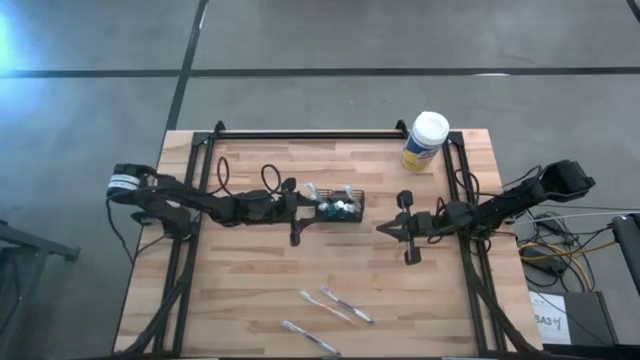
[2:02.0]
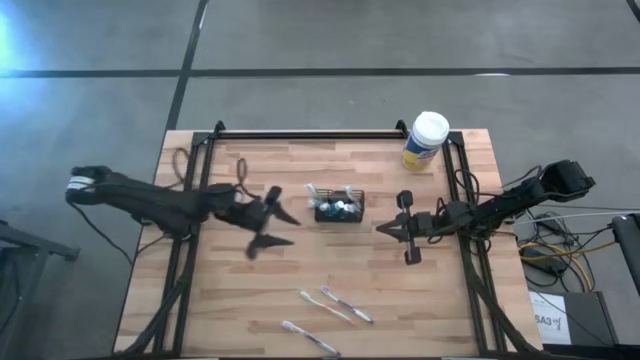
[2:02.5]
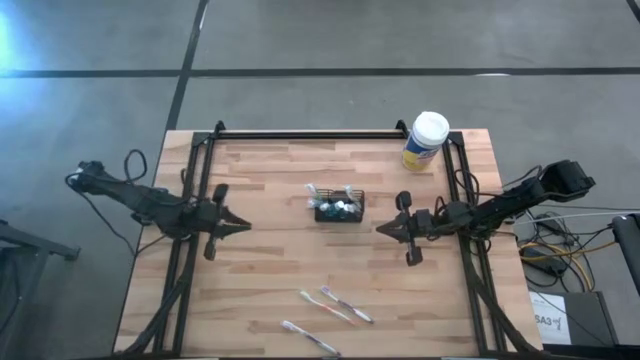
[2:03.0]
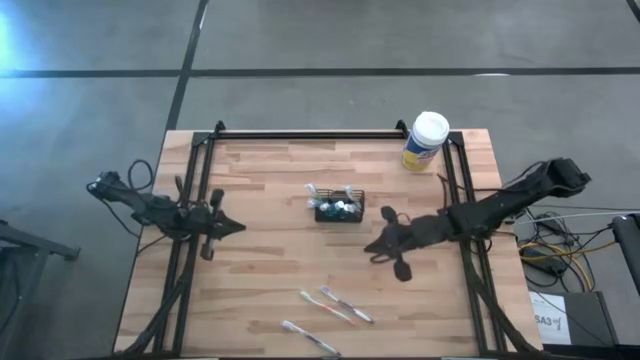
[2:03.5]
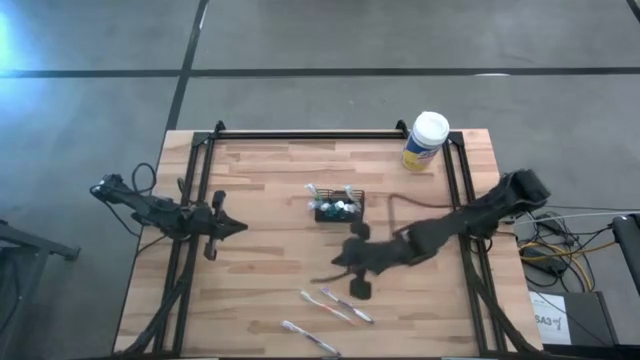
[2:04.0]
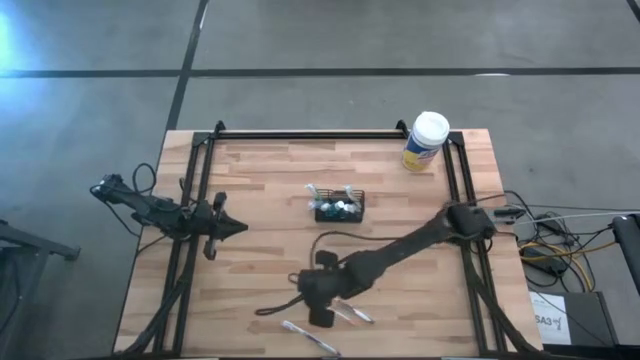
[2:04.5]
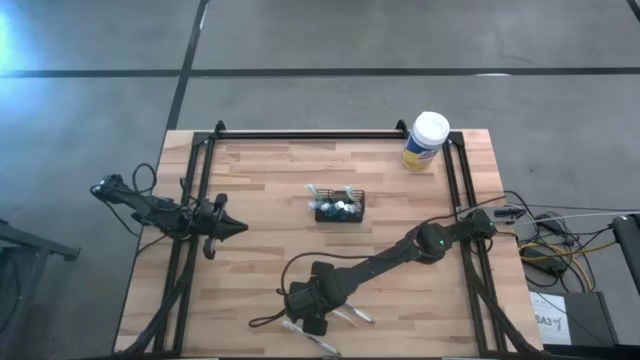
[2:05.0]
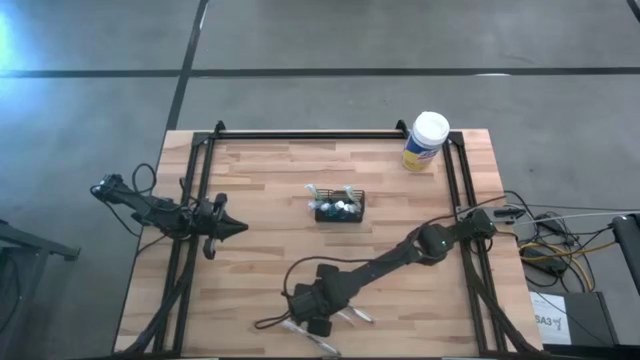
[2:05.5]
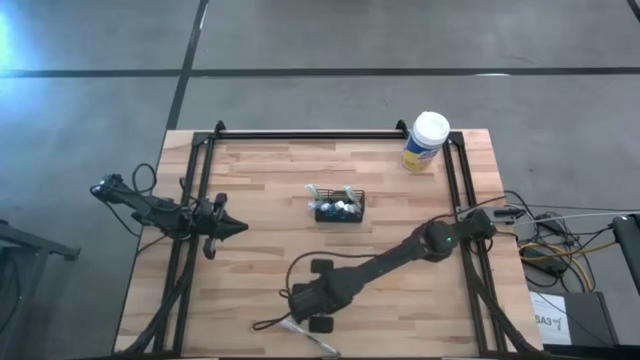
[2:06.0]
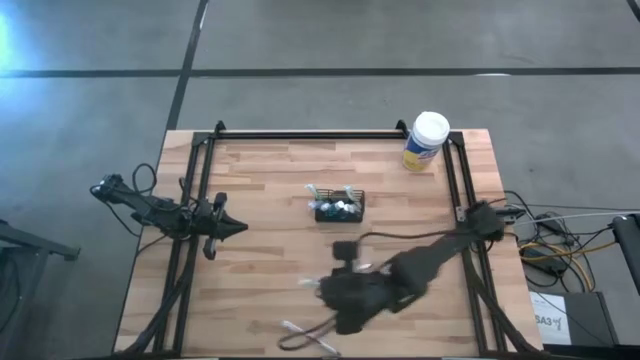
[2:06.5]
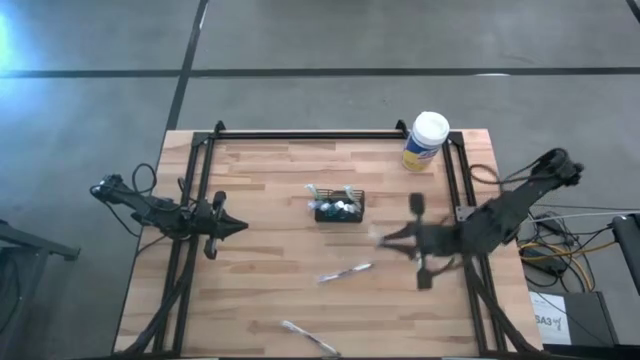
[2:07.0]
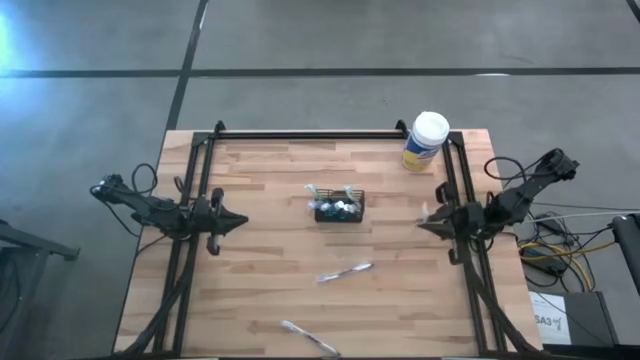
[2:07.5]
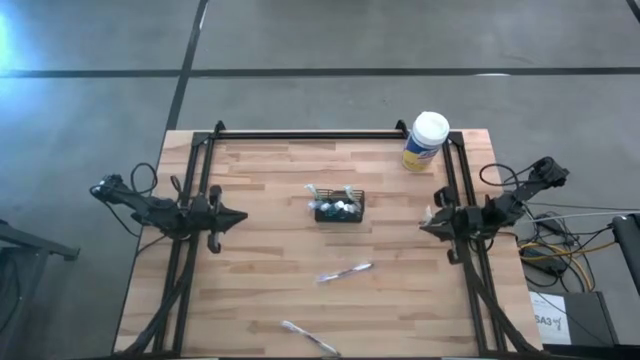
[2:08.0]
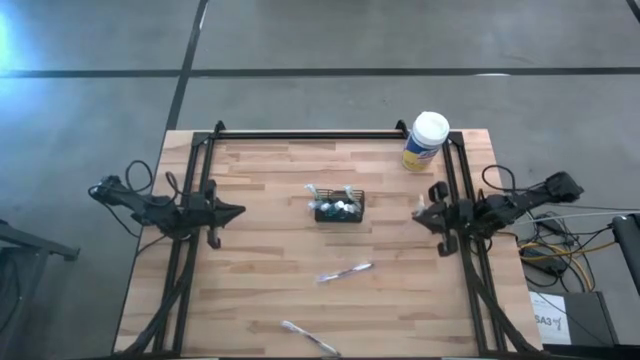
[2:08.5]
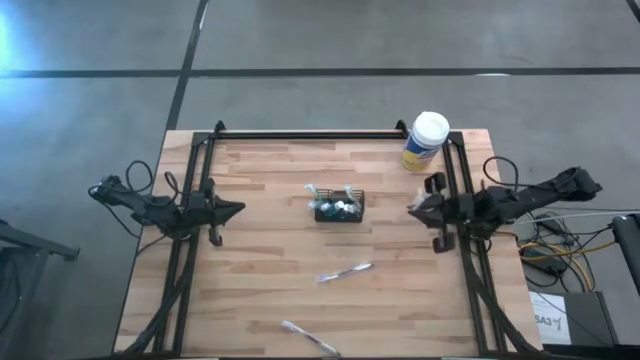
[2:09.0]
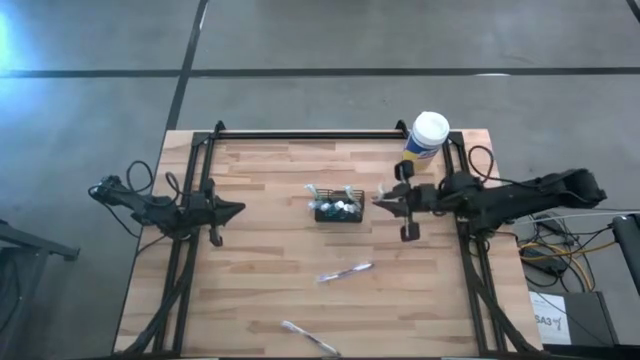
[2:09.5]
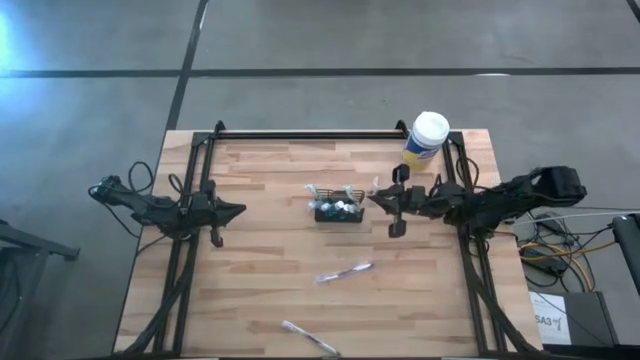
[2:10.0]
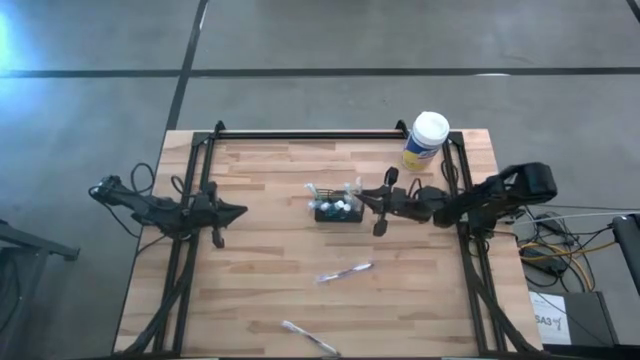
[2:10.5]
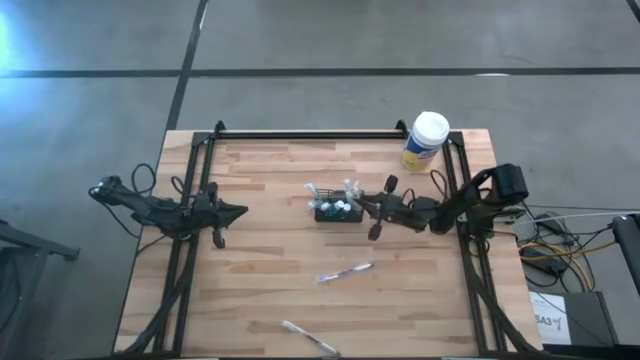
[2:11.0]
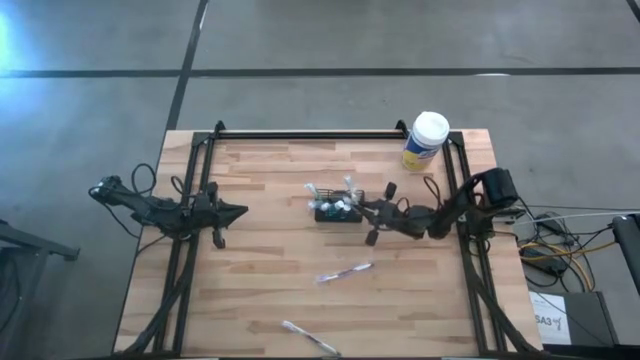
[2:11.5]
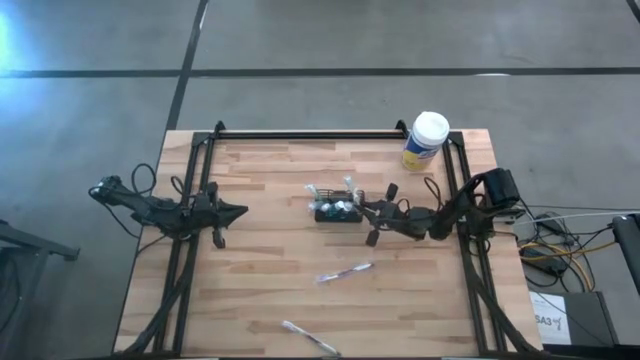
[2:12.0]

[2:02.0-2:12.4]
Task: Pick & Place toothbrushing station
Put the orange toothbrush into the black wire organizer

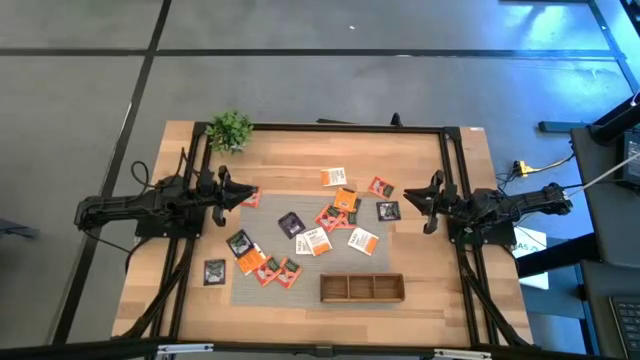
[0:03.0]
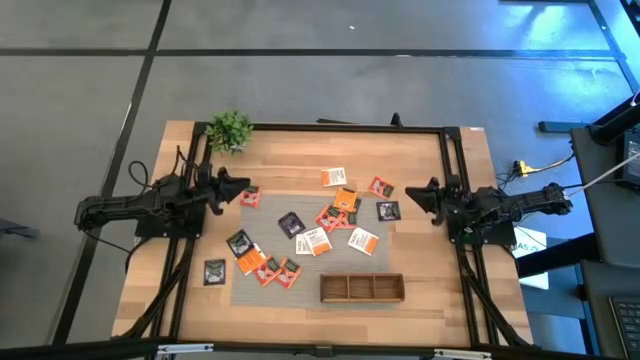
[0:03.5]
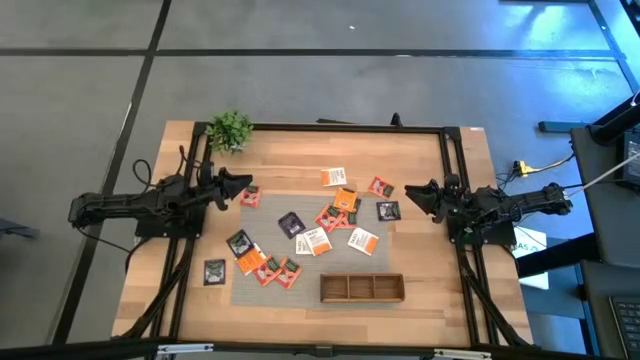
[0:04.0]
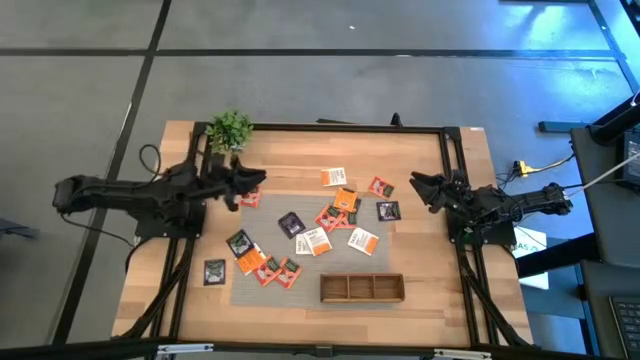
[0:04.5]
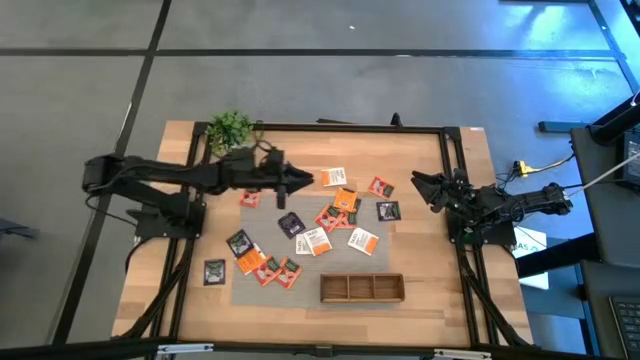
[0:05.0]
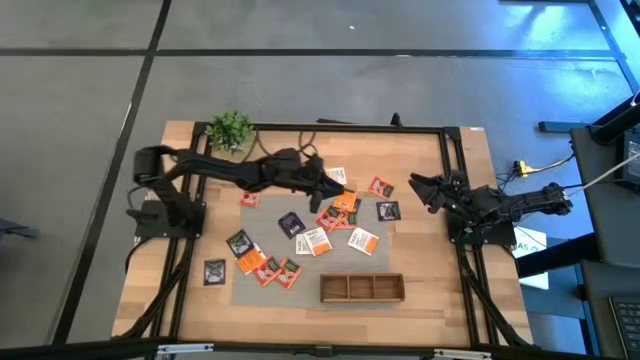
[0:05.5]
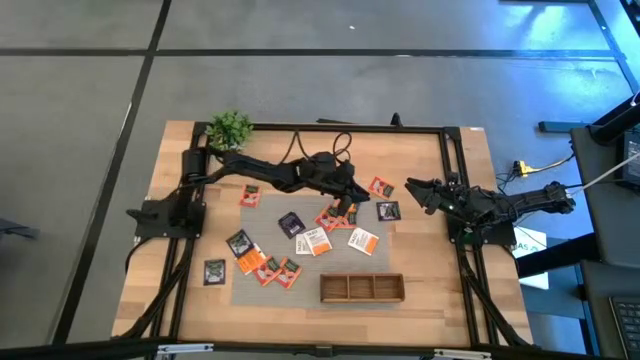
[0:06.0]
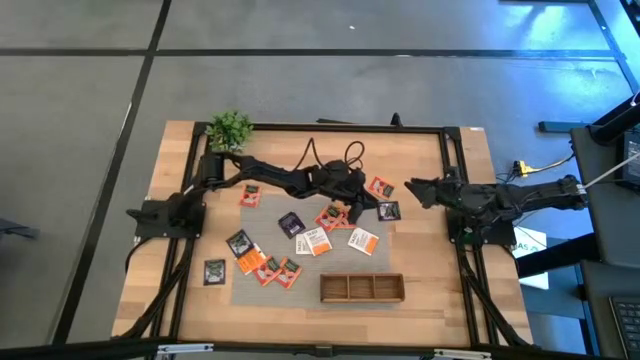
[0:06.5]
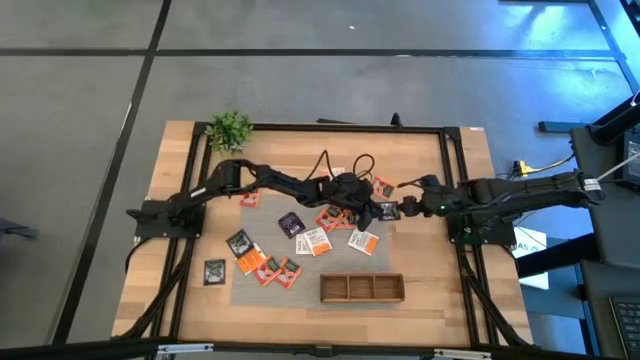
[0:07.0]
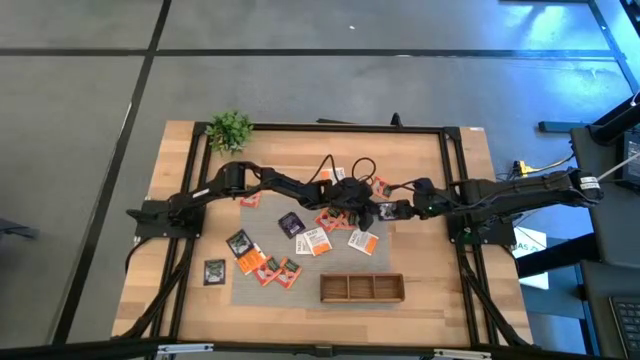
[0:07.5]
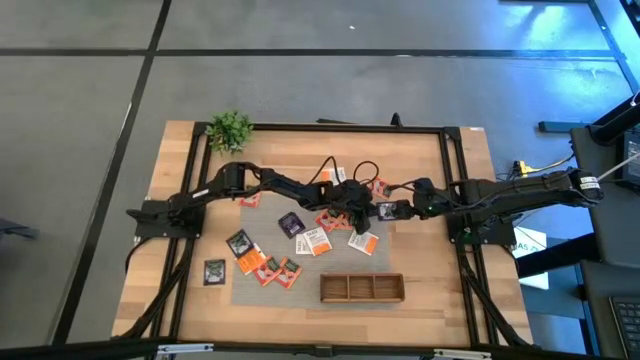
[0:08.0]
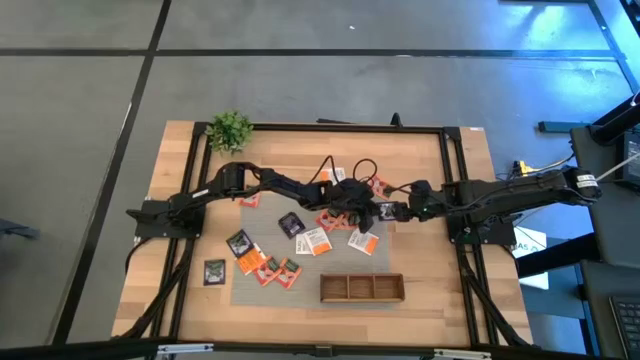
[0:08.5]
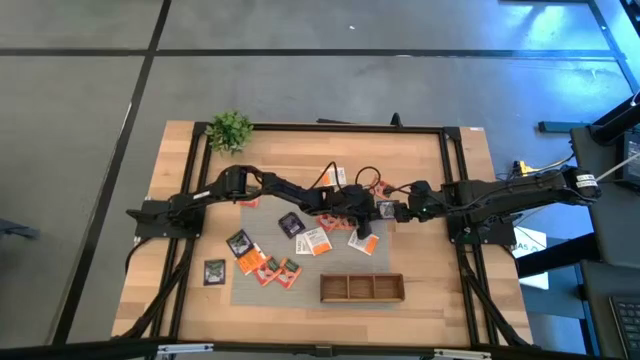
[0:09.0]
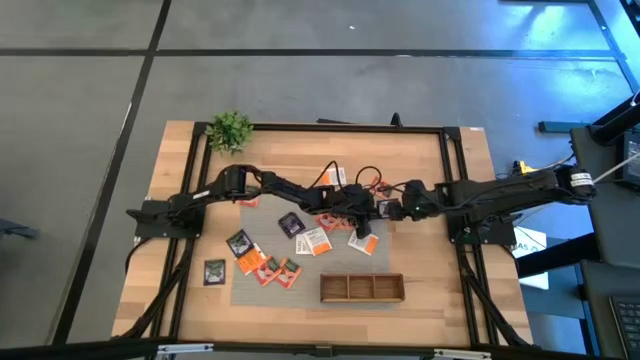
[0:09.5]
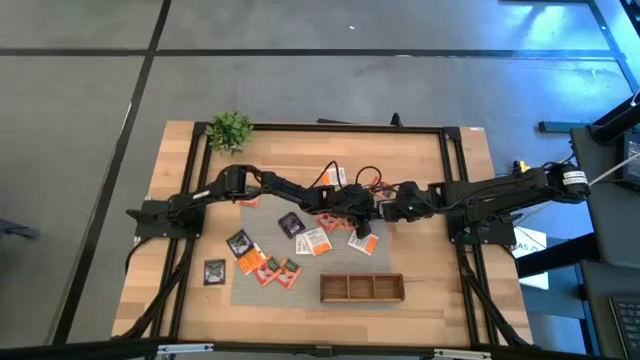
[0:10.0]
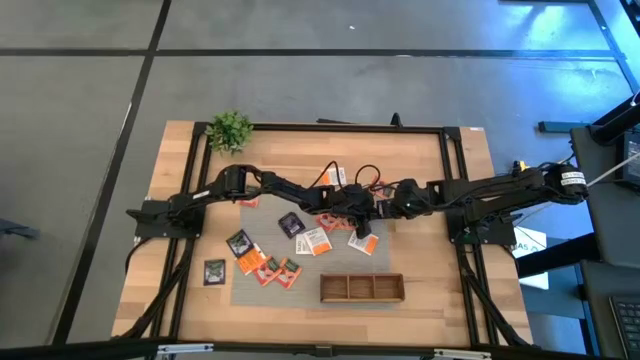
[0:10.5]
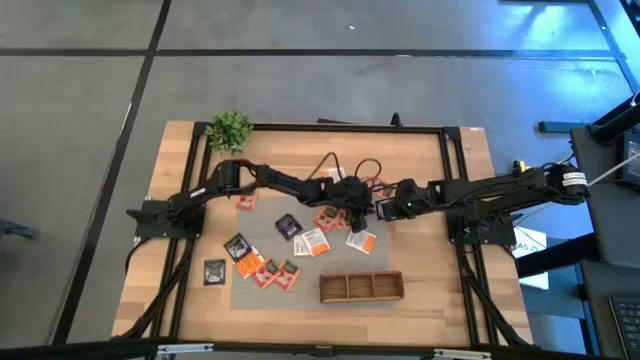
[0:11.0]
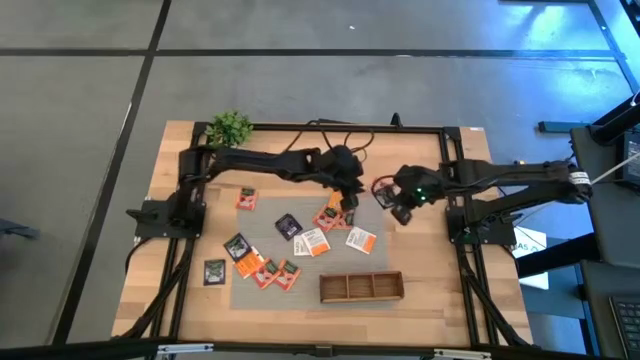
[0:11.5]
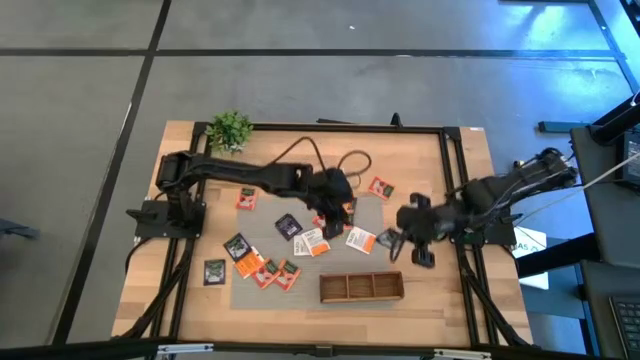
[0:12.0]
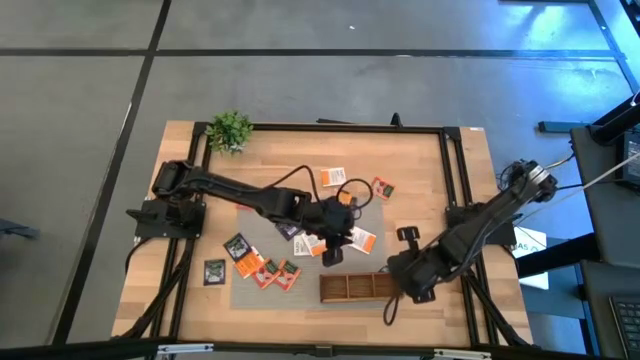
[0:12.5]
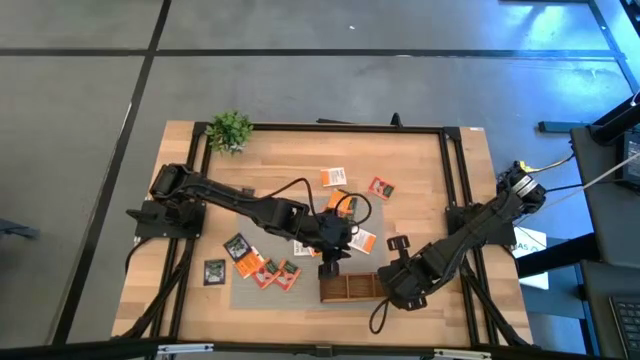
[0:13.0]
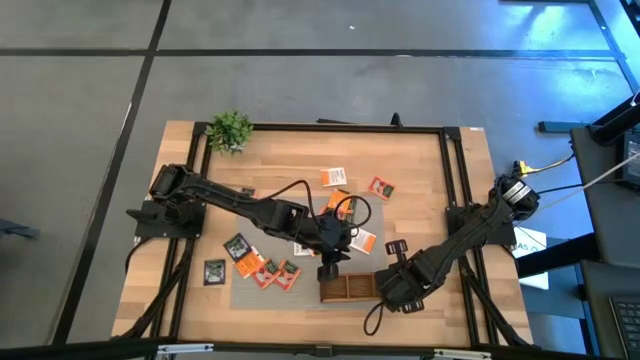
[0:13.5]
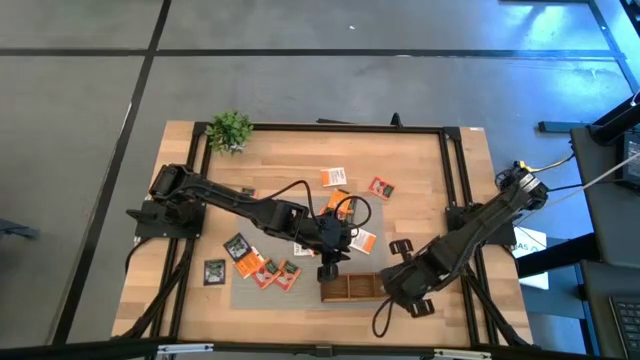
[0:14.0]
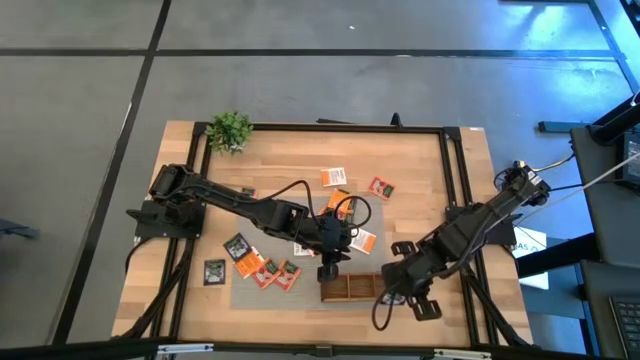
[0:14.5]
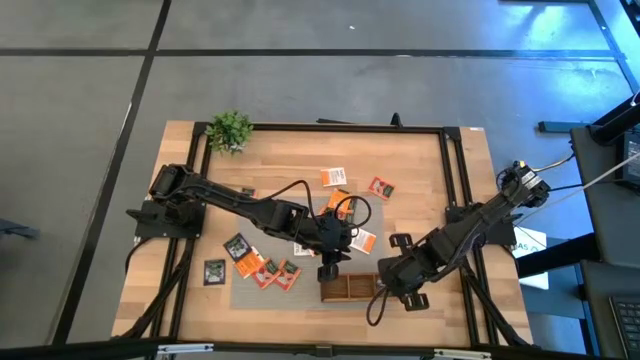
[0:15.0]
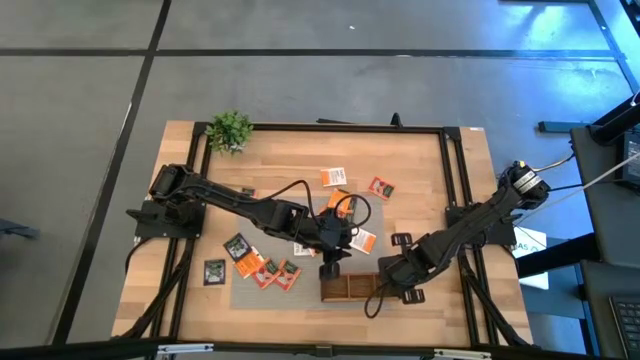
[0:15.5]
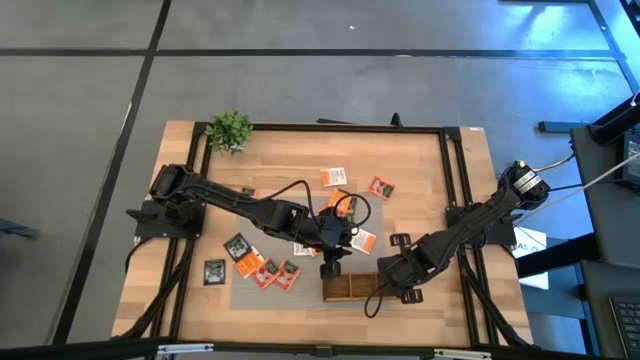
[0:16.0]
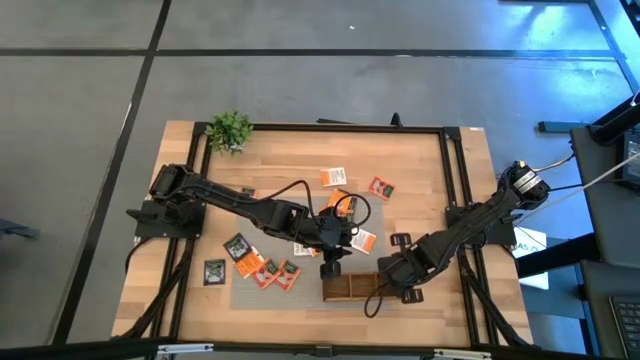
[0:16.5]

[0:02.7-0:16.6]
Task: Pick & Place Tea
Put the black tea bag into the right compartment of the wooden organizer
